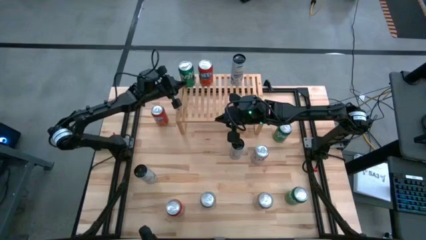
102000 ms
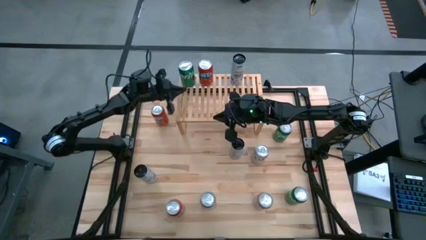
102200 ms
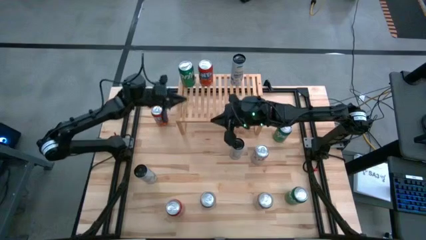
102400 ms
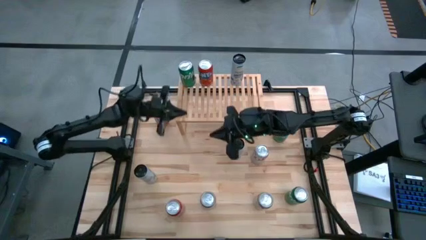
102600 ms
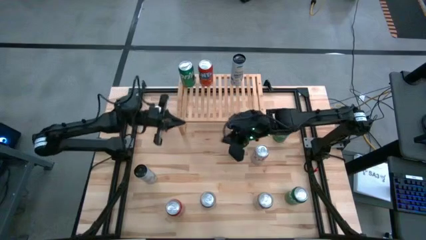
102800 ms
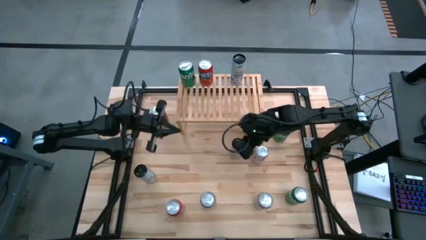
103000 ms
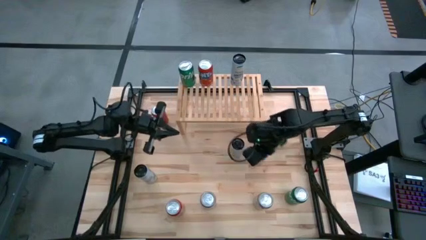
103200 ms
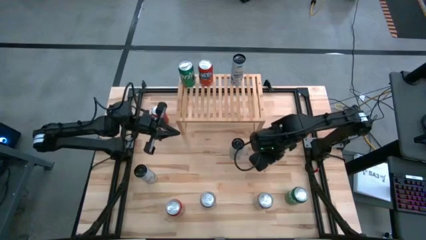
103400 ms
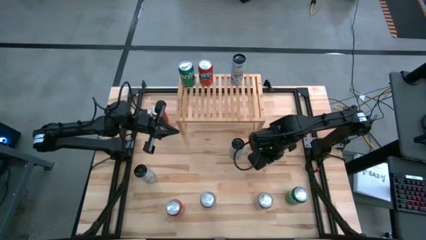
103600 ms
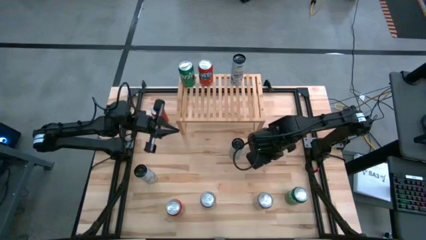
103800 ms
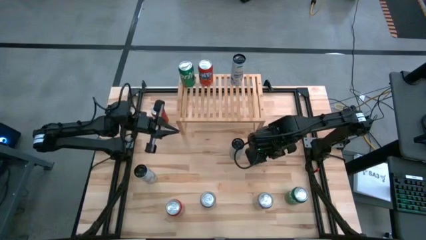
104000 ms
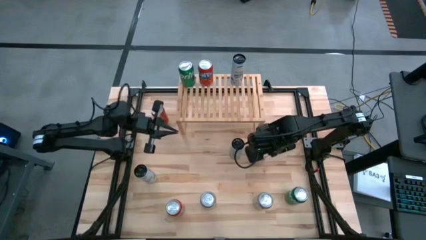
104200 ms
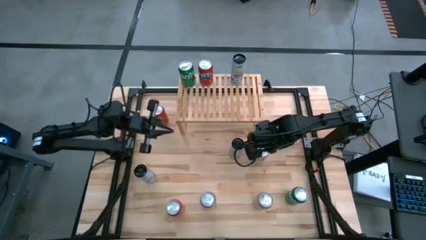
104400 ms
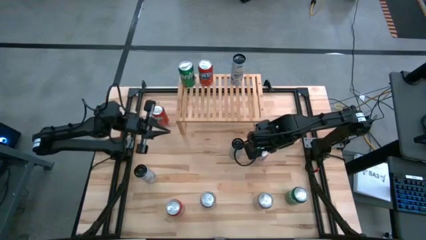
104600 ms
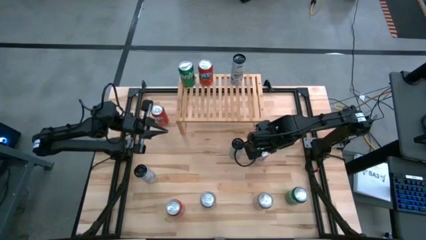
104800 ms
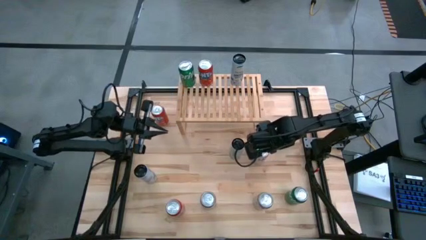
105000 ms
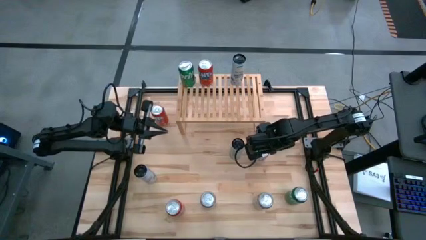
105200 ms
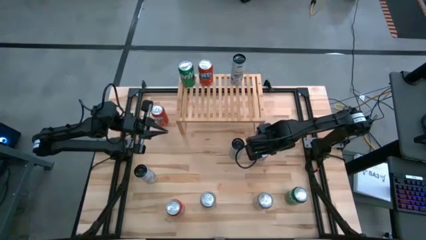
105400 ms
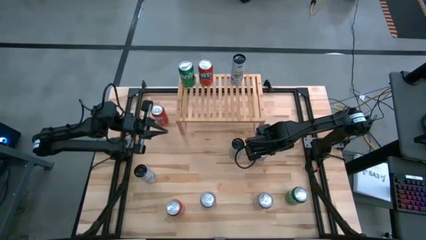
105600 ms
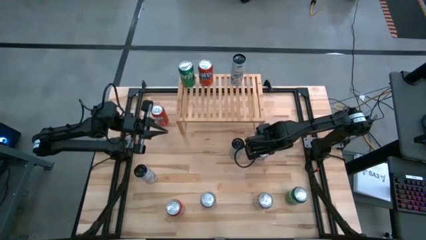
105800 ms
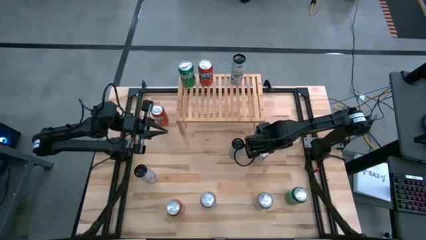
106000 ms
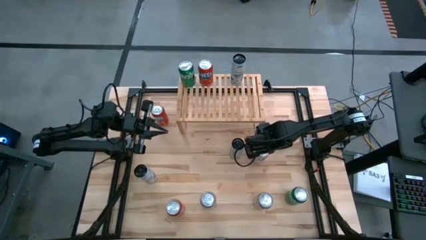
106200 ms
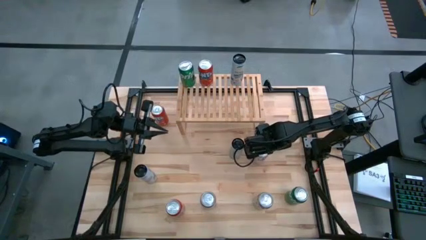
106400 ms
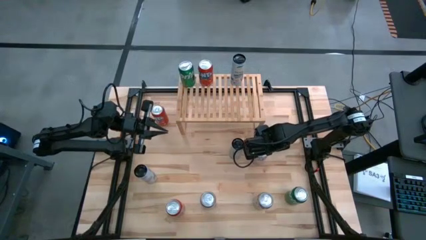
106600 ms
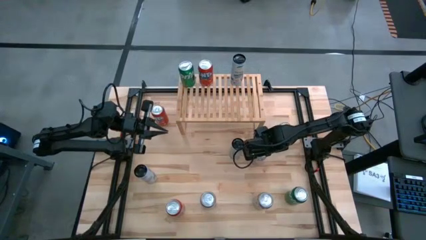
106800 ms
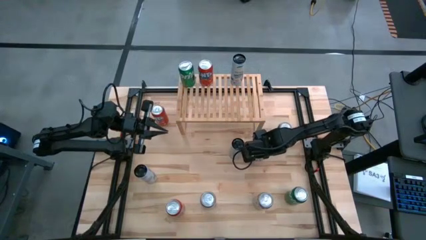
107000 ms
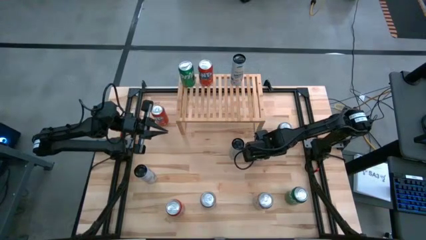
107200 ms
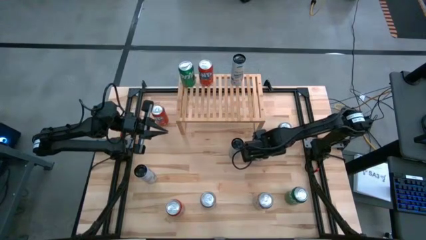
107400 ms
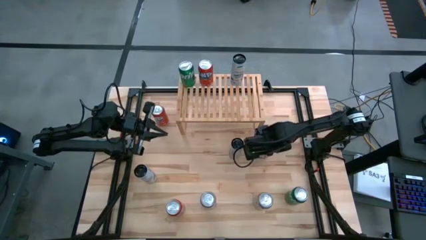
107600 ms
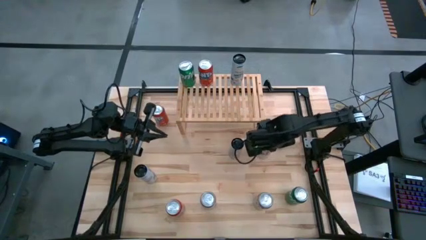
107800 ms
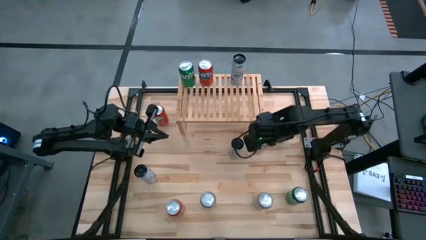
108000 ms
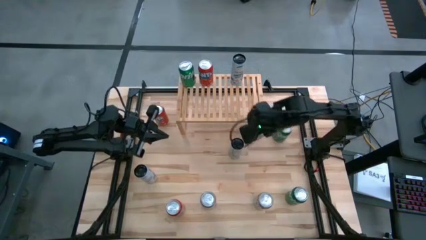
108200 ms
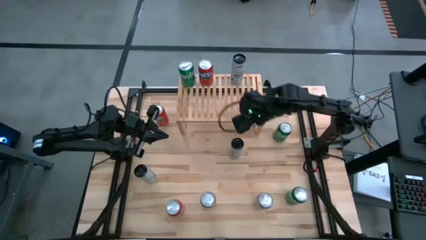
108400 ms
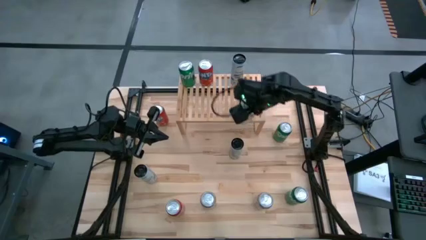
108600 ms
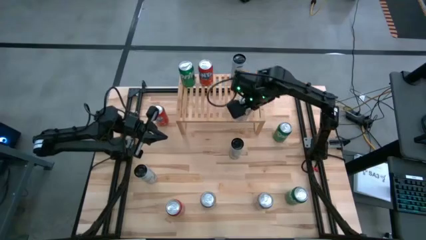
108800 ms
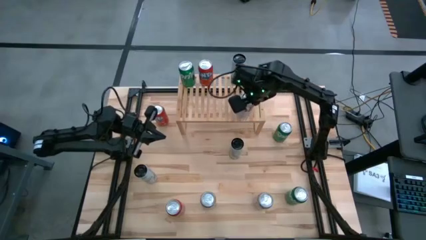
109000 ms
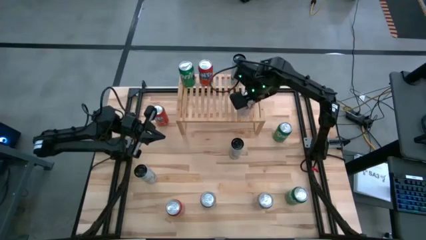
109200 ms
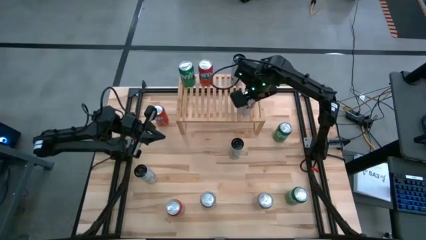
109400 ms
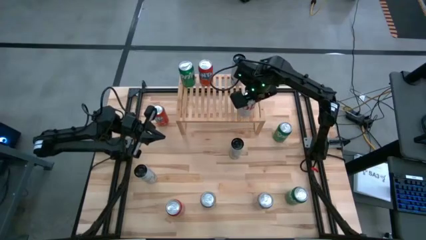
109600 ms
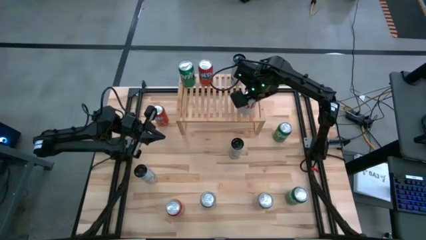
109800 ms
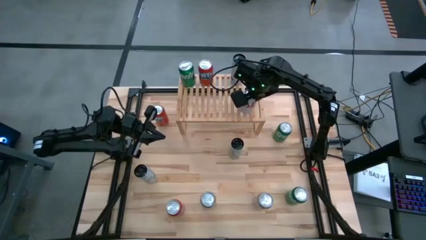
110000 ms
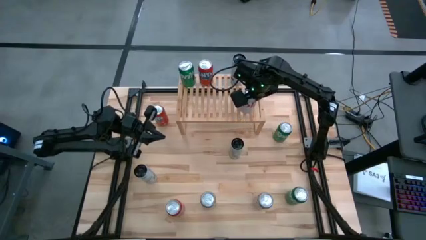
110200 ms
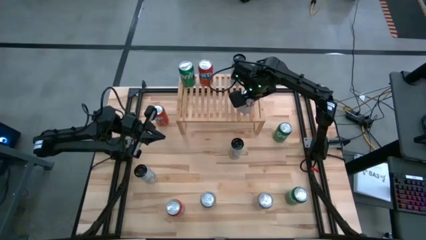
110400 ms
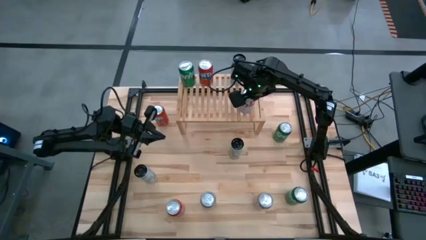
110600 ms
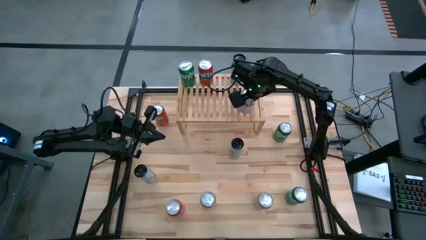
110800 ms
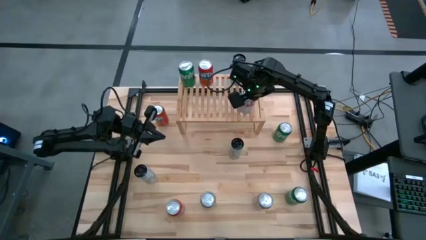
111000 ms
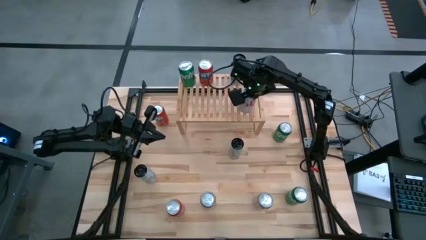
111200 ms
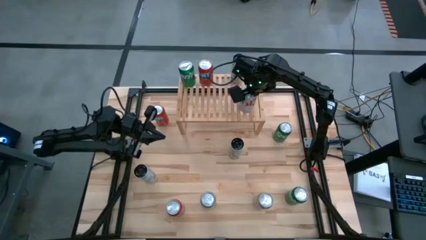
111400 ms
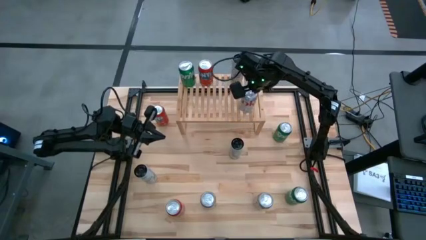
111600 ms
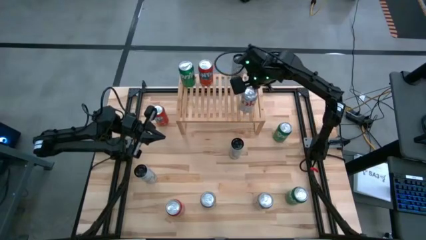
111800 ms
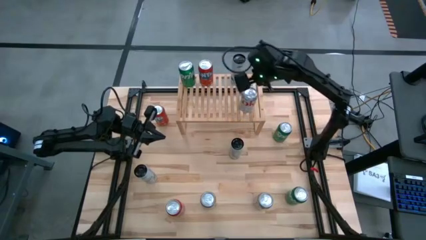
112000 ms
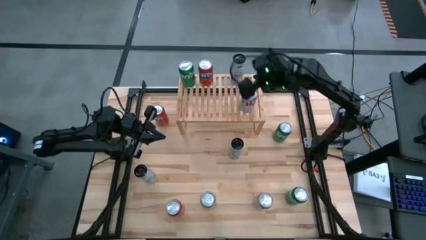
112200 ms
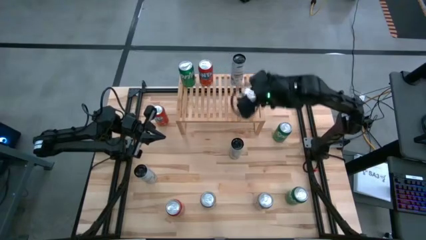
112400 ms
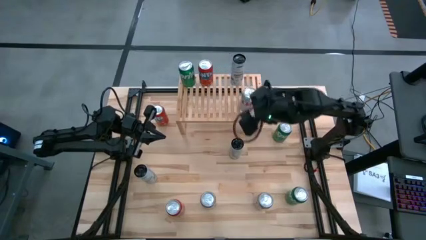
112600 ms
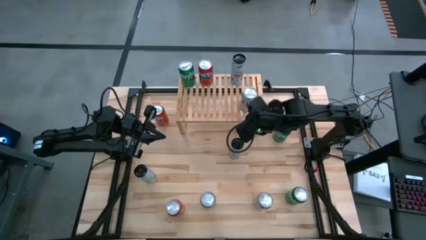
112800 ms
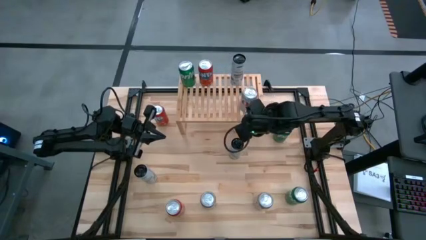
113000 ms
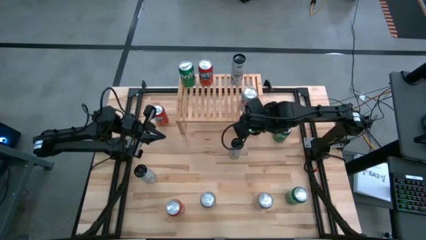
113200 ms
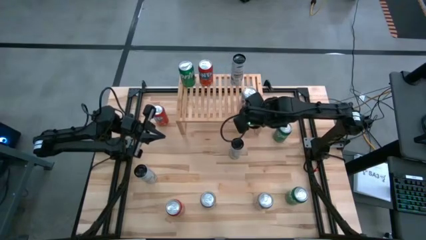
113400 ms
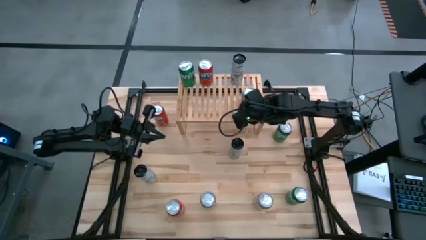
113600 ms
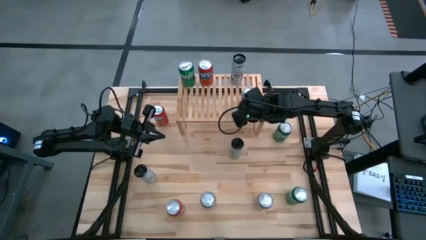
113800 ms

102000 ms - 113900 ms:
Task: Place canned beverage on shelf
Put the top red silver soda can on the shelf
